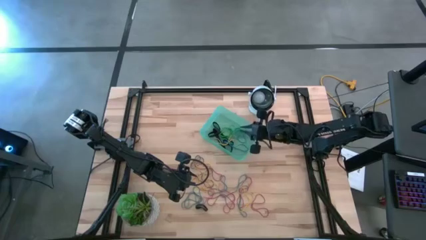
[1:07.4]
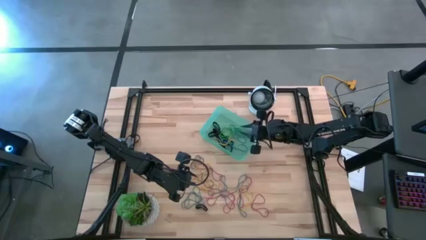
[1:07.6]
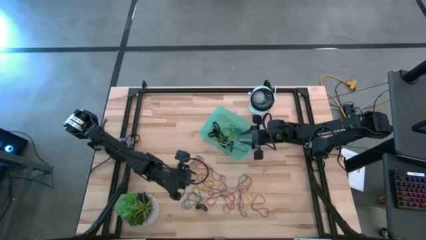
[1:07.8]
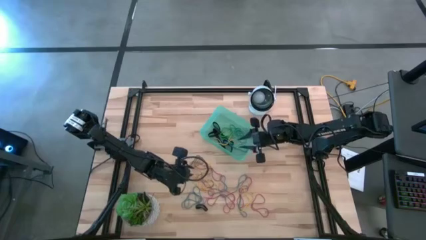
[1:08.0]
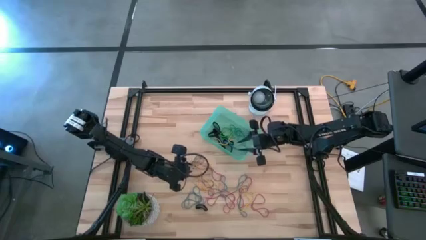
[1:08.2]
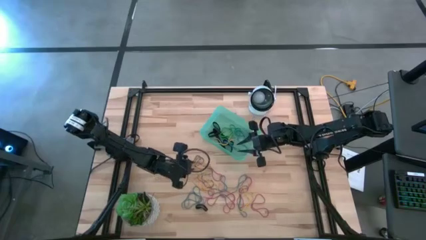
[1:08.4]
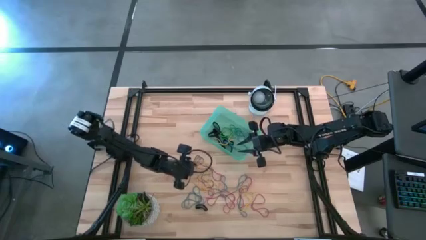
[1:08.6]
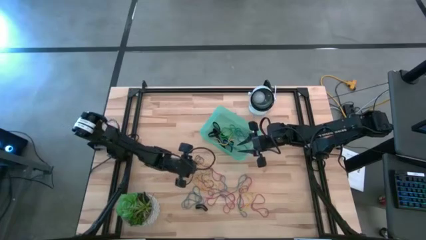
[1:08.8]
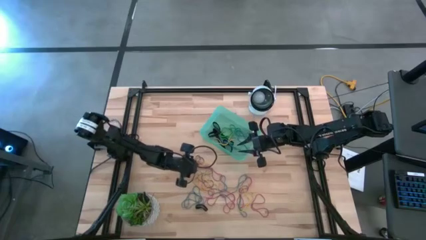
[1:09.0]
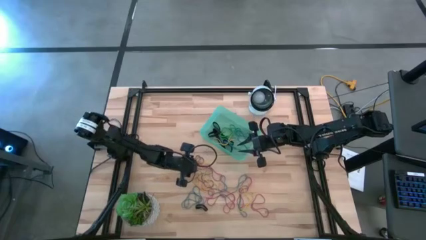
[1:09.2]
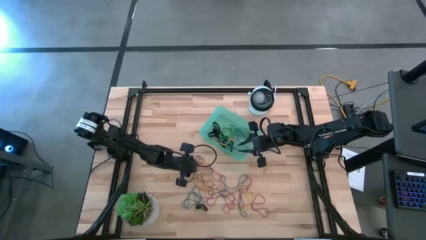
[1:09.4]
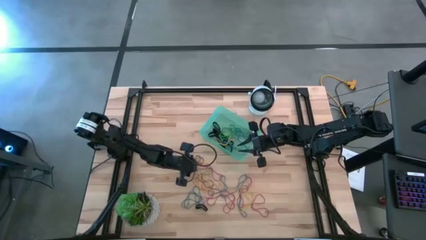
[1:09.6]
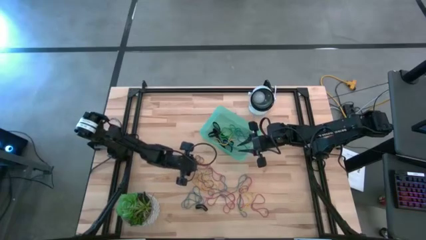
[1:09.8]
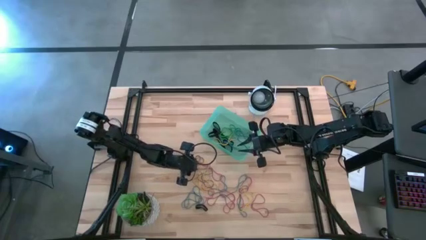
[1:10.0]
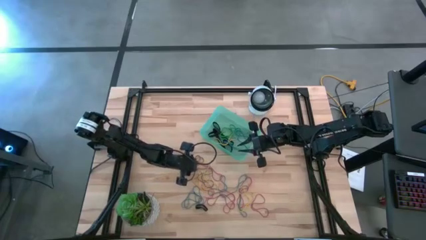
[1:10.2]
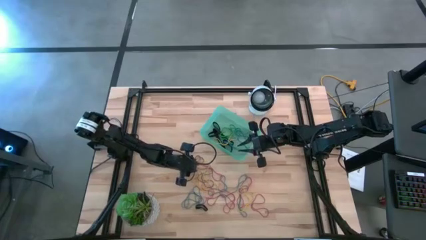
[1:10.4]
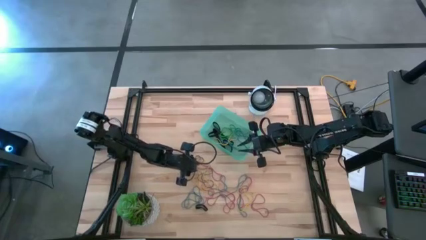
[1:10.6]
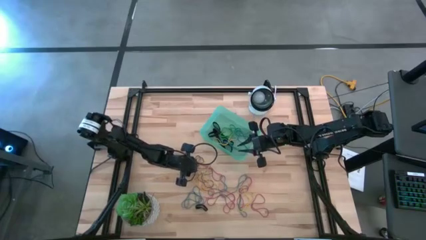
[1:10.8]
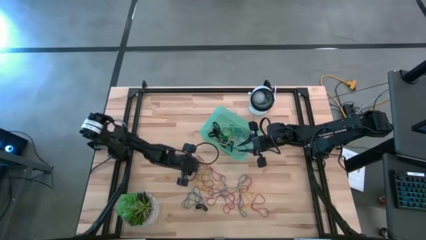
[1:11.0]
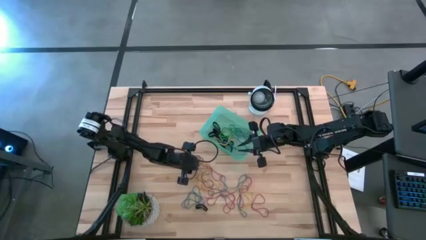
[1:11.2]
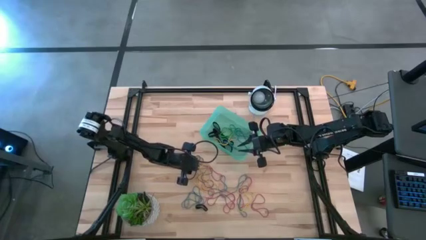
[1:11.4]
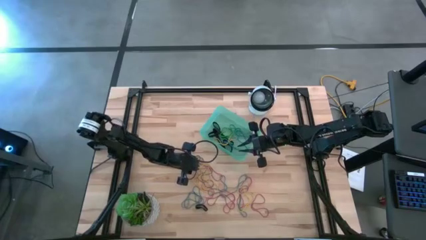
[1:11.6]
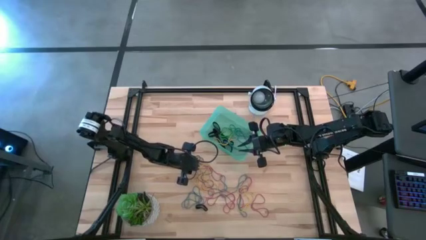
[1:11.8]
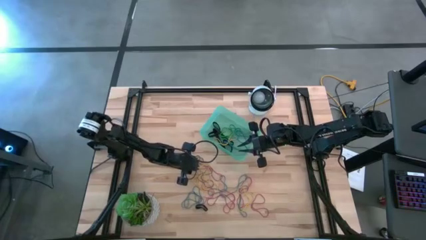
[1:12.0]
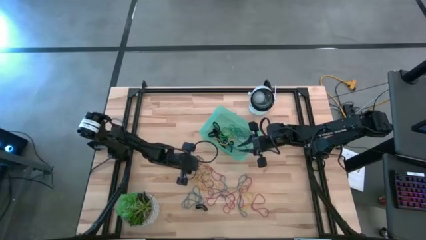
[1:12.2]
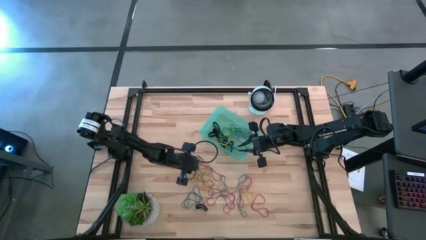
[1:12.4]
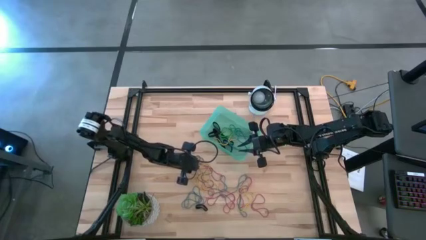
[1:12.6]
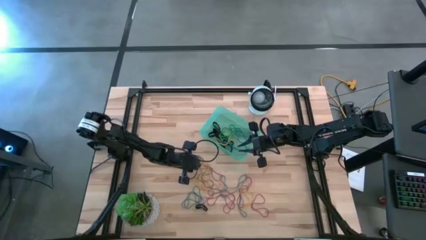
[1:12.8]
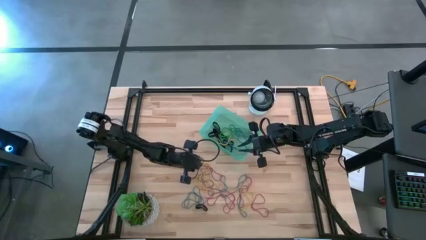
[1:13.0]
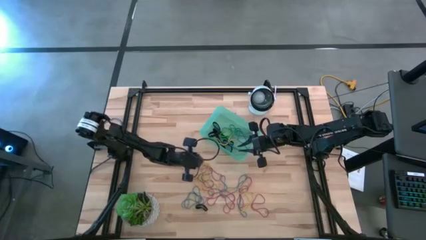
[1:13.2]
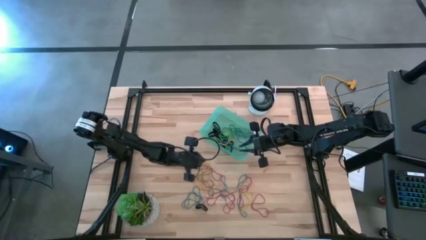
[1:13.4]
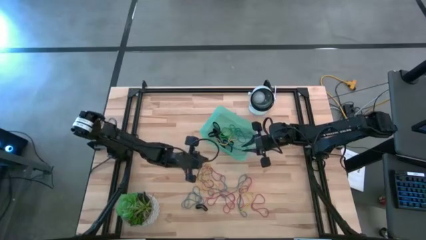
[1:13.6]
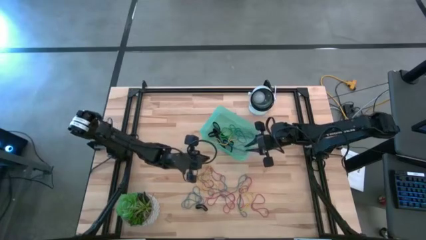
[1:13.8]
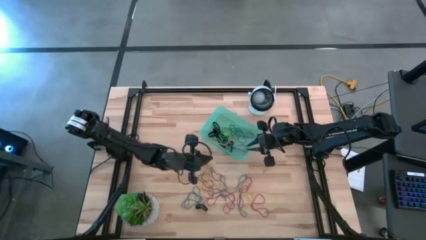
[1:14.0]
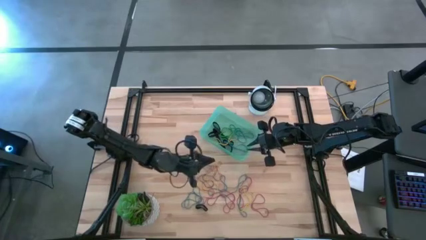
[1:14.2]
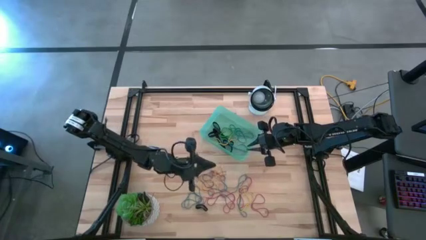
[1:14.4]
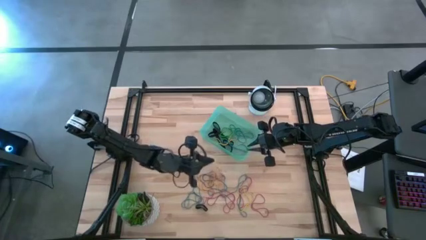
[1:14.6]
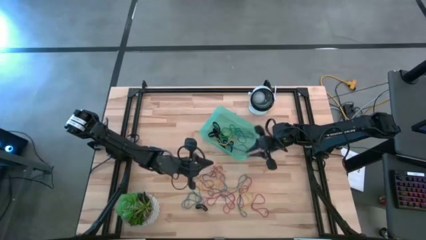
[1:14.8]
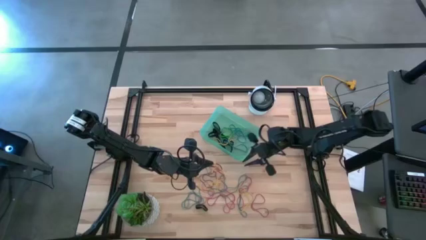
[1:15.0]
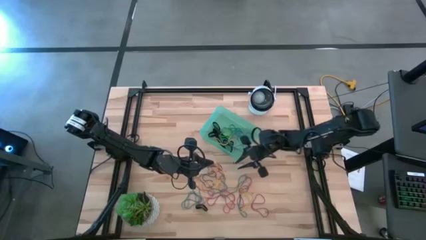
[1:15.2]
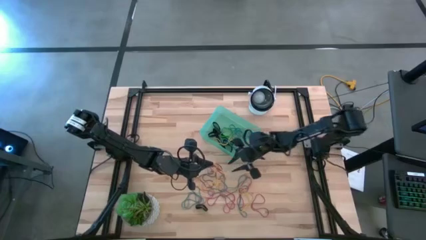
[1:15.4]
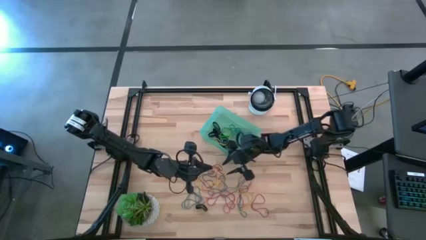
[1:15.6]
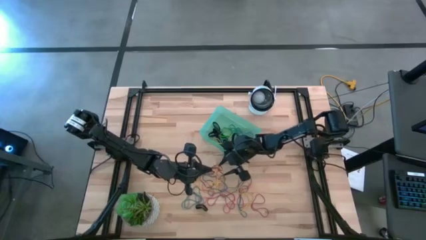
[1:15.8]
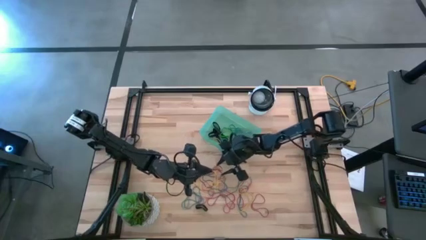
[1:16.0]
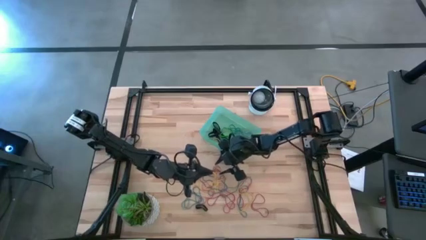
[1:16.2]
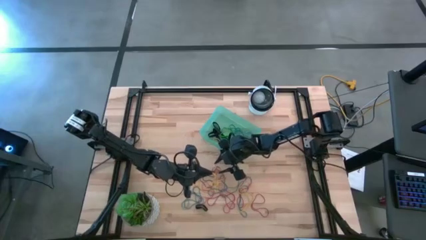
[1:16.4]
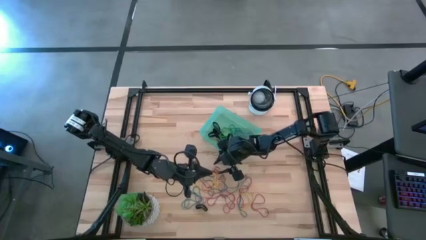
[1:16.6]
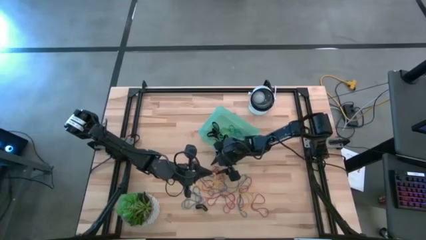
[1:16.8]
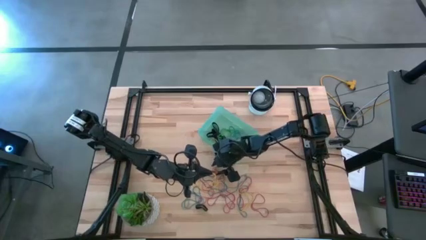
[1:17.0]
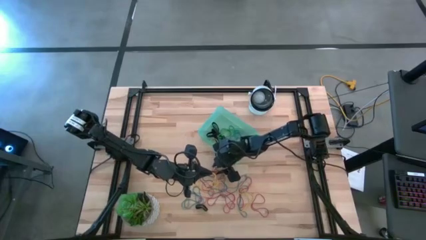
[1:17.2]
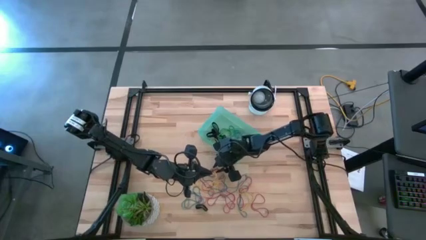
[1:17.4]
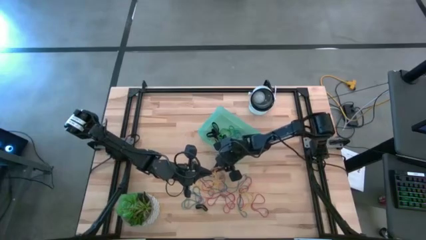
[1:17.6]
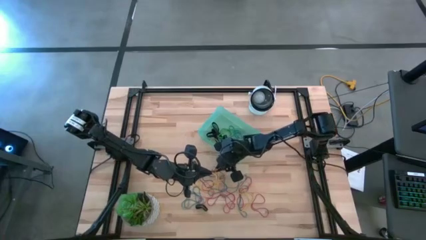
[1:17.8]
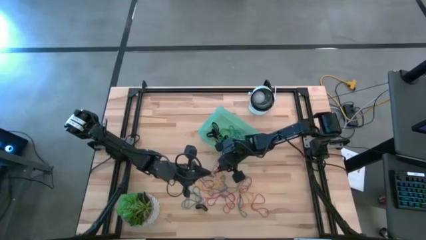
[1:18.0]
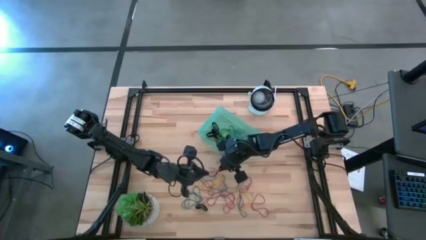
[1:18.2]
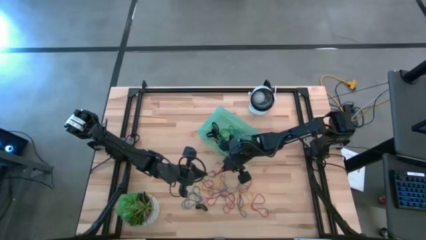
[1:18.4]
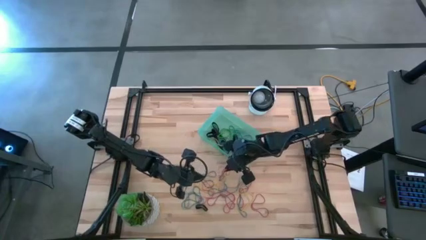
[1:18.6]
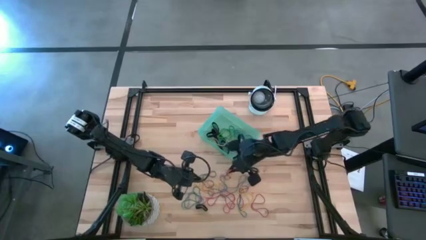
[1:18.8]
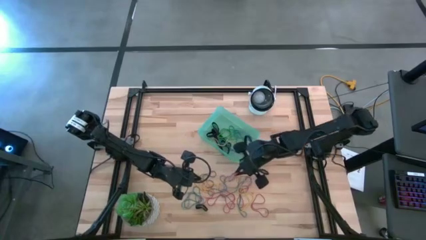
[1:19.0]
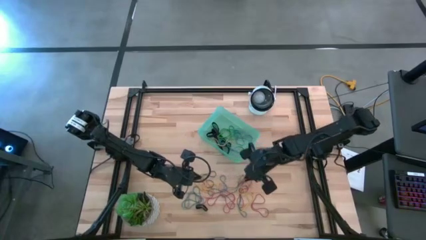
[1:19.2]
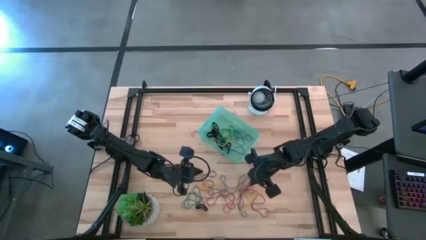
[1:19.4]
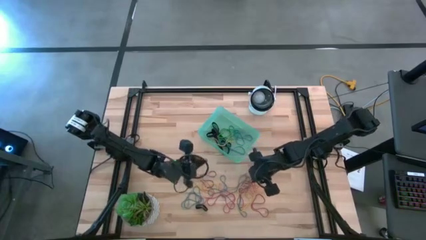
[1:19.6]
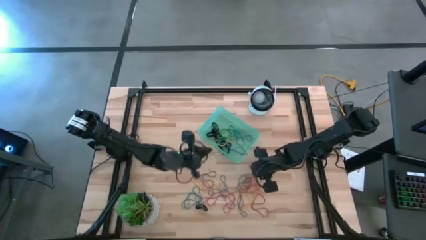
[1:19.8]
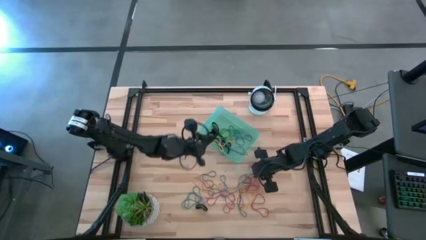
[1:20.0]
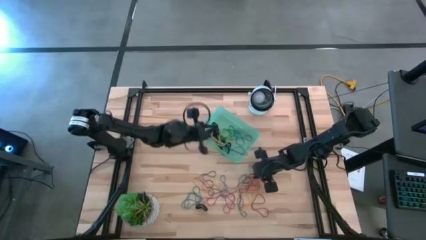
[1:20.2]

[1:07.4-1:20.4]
Task: Pick and place rubber bands into bin
Put the yellow rubber band into the blue bin

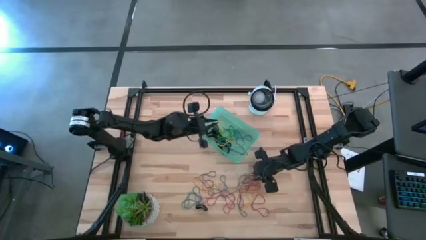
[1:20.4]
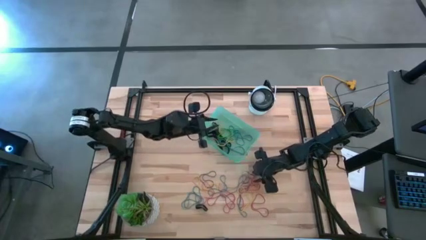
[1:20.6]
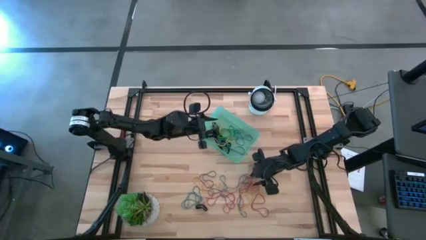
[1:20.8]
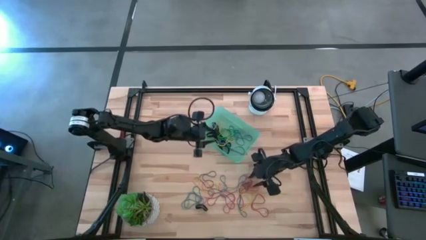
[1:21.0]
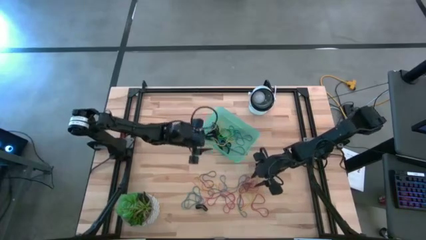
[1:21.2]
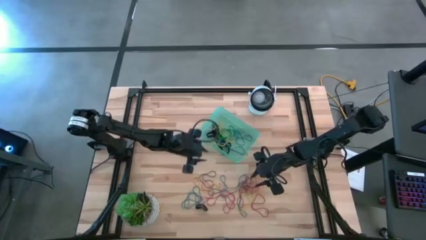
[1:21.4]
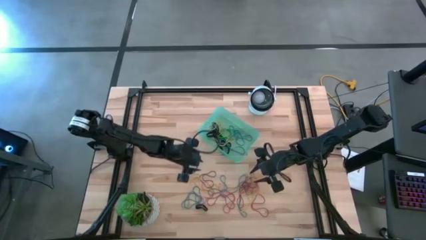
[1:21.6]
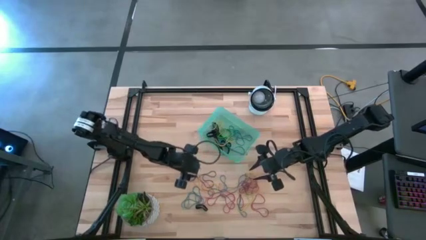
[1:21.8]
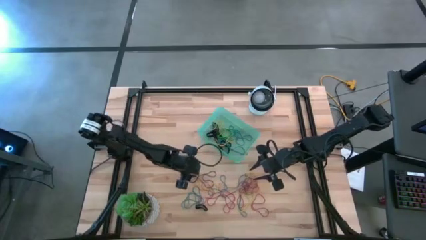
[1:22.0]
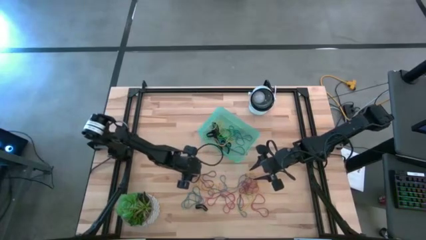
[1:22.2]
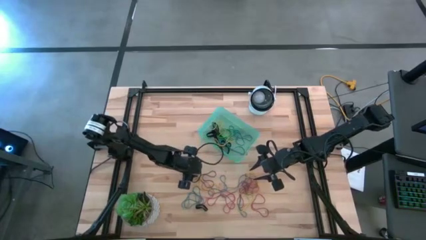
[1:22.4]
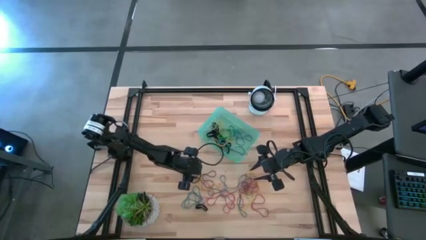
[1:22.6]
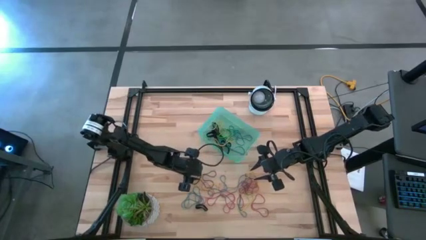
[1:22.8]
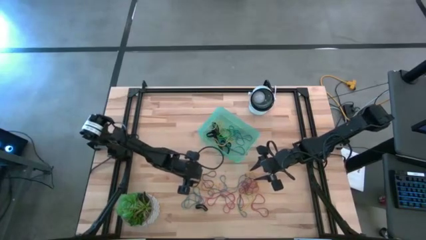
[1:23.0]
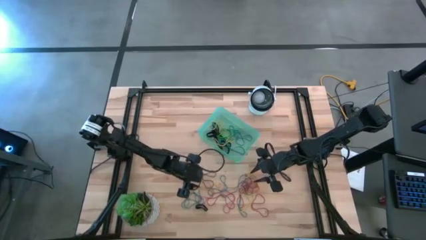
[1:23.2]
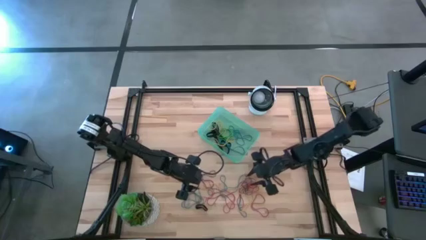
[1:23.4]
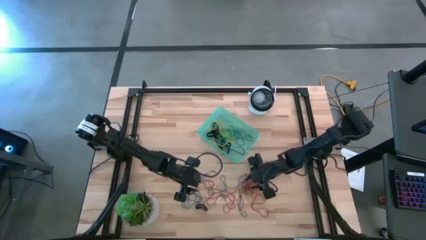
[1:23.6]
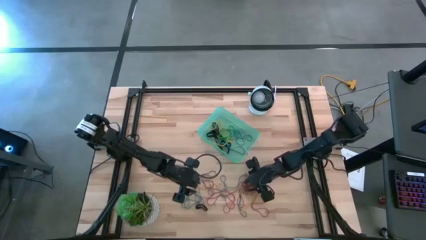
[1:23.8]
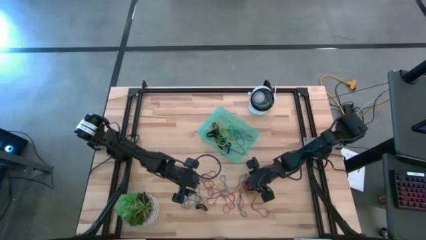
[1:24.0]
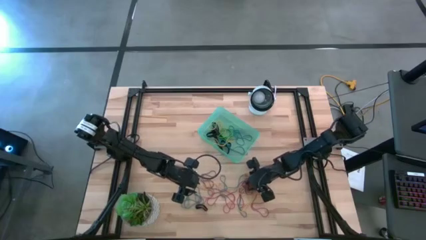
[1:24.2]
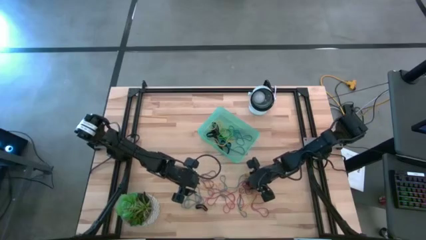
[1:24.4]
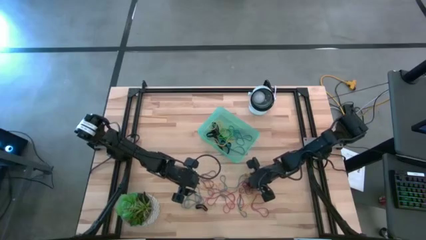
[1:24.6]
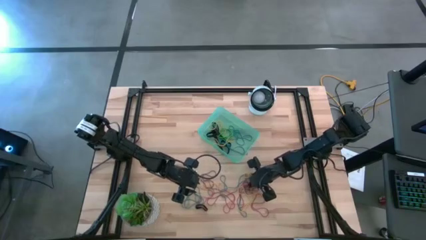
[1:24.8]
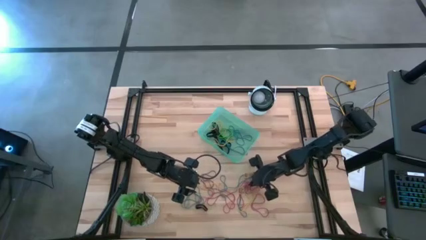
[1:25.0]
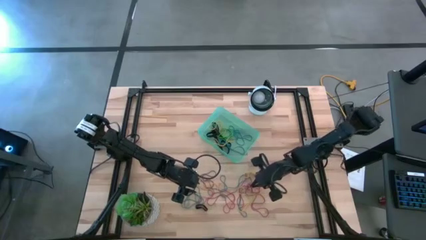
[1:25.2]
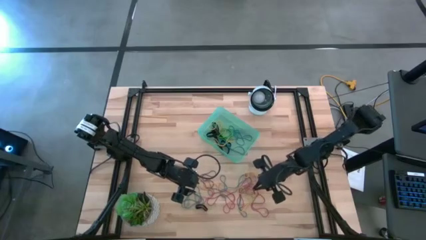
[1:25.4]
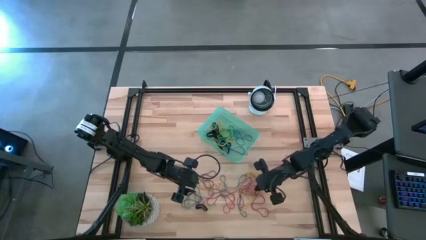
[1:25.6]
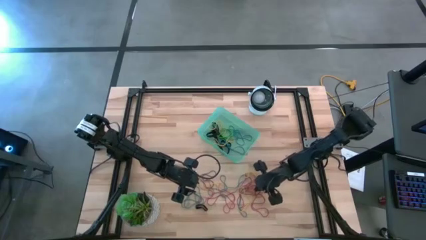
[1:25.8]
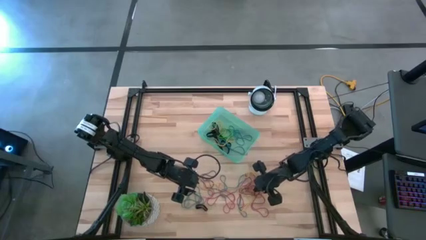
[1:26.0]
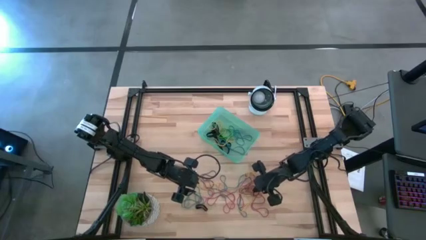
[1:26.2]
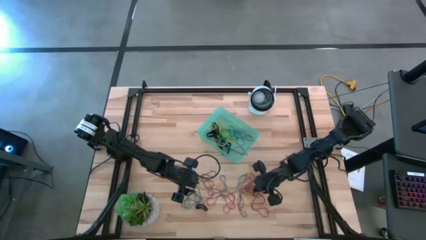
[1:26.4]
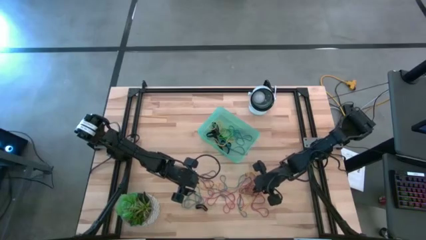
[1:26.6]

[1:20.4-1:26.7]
Put the violet rubber band into the blue bin
